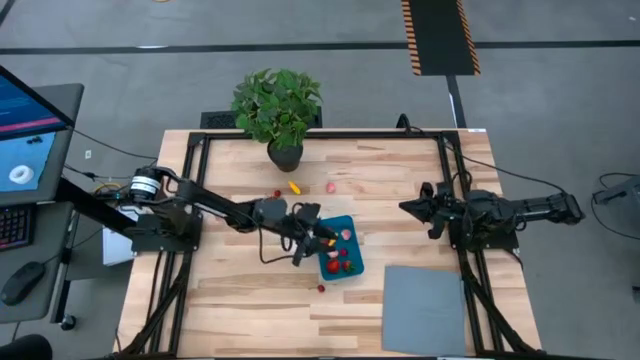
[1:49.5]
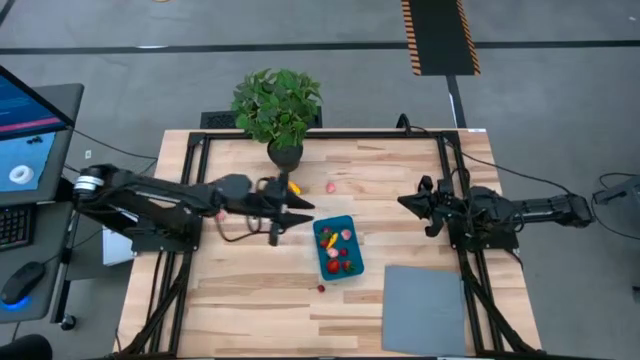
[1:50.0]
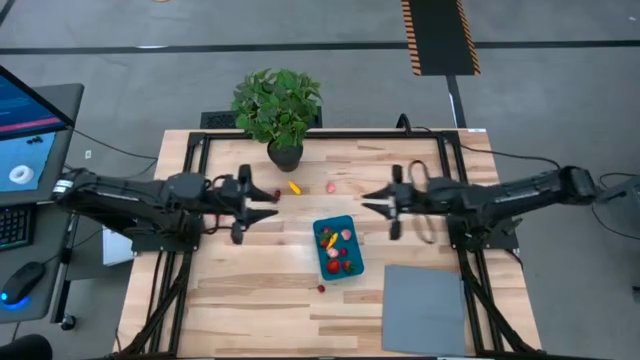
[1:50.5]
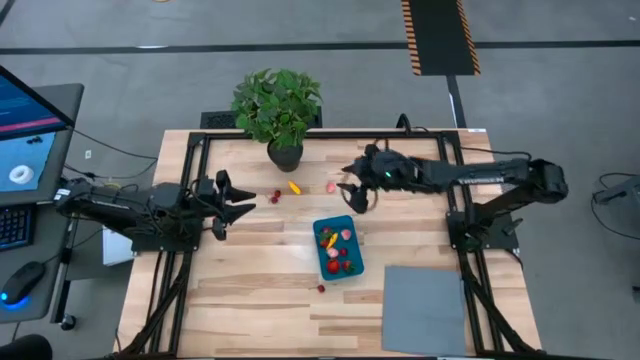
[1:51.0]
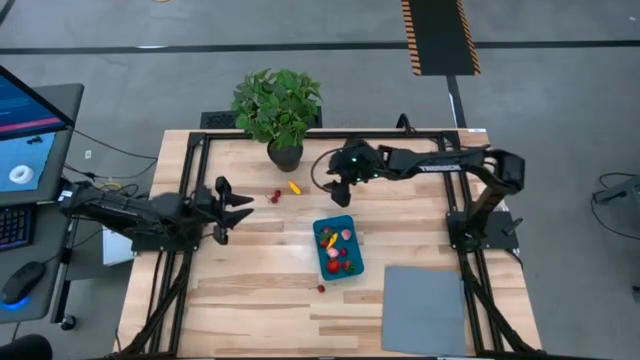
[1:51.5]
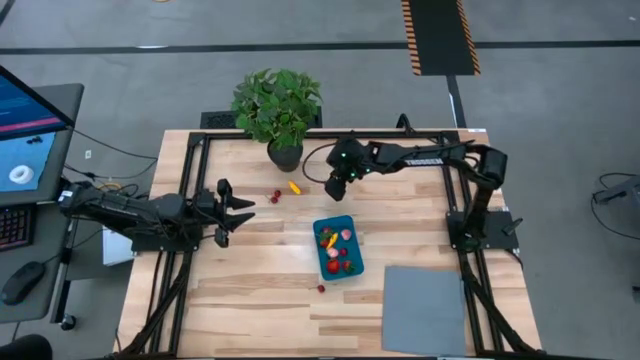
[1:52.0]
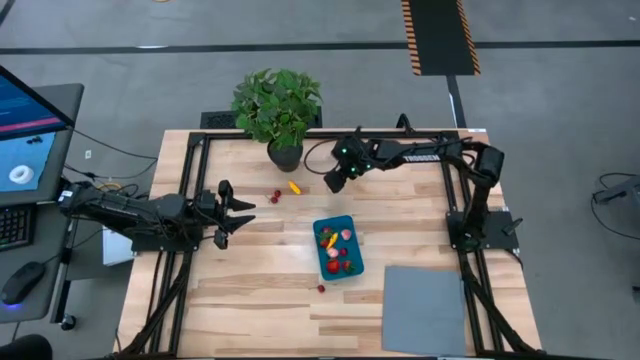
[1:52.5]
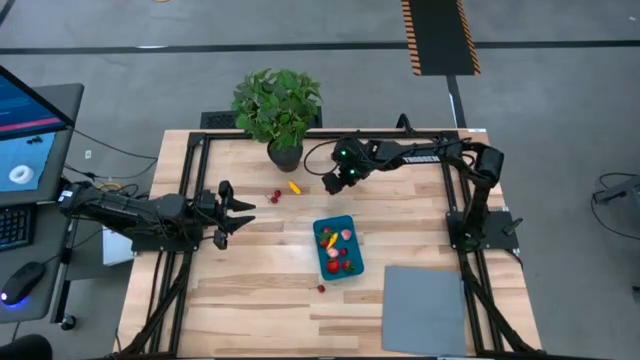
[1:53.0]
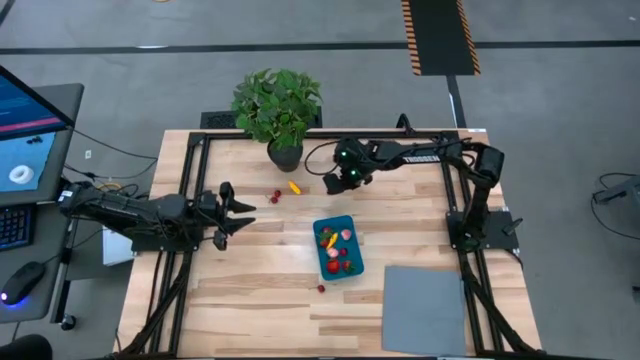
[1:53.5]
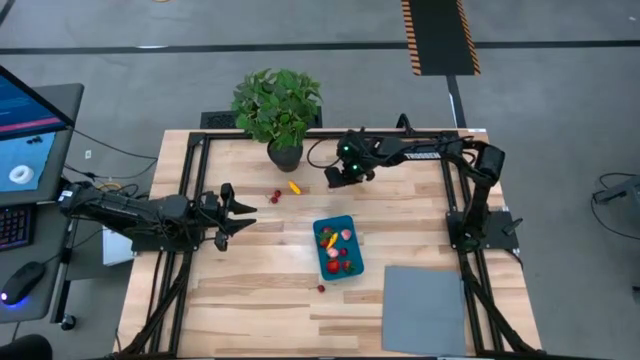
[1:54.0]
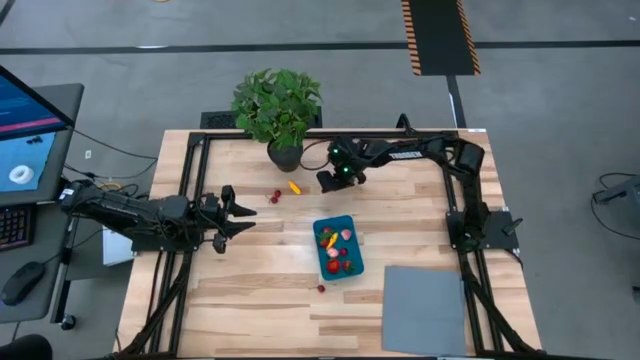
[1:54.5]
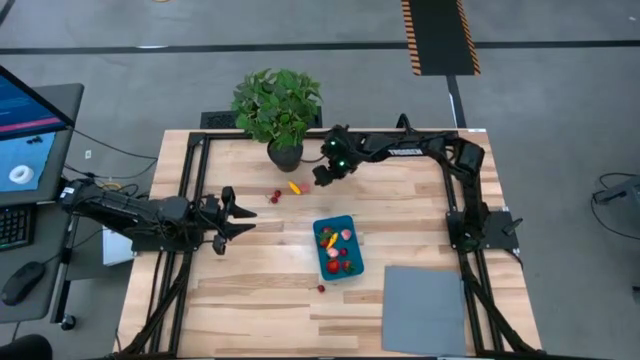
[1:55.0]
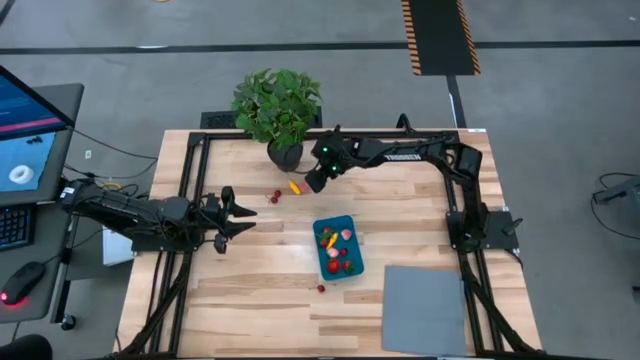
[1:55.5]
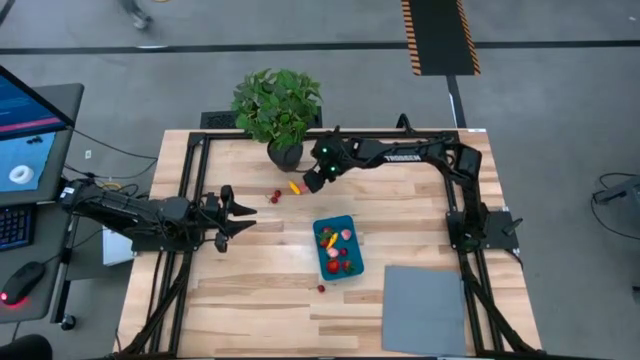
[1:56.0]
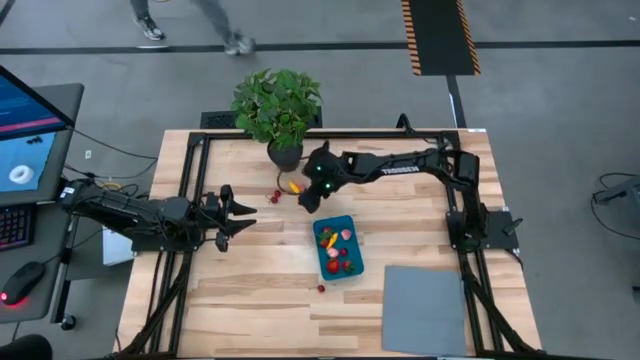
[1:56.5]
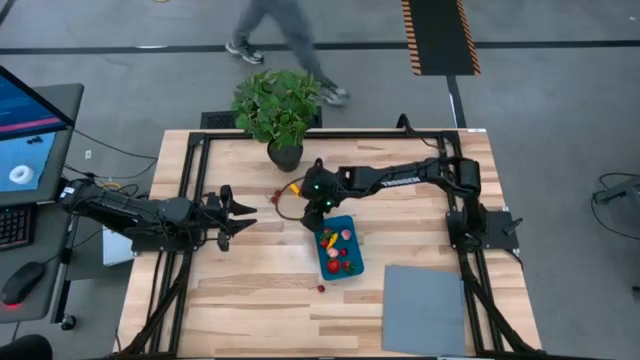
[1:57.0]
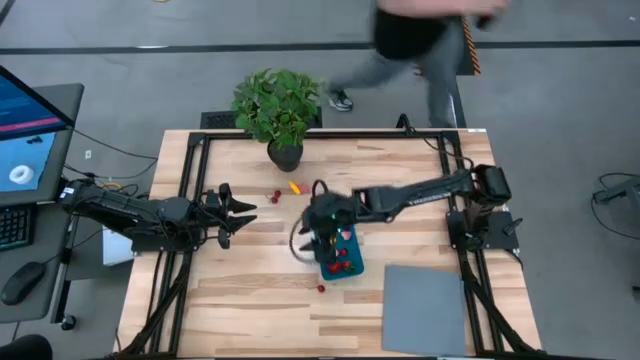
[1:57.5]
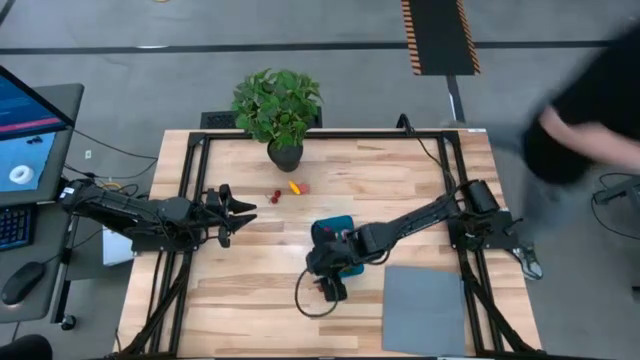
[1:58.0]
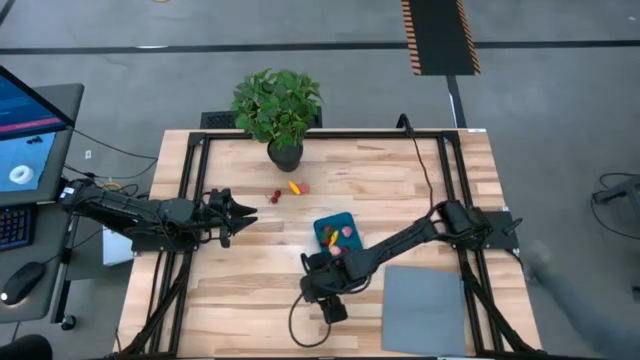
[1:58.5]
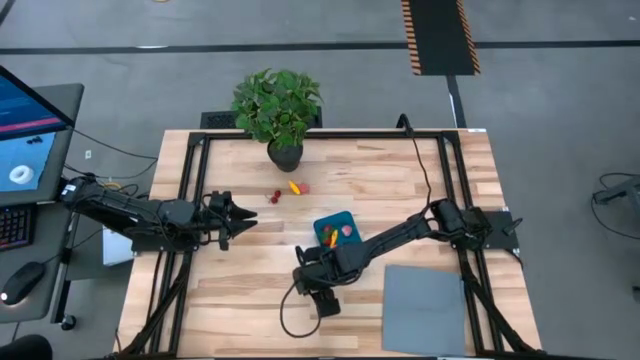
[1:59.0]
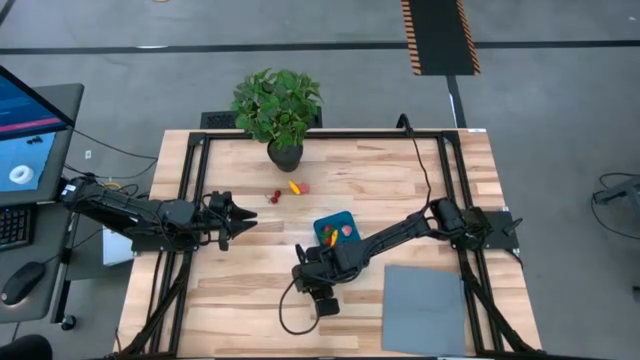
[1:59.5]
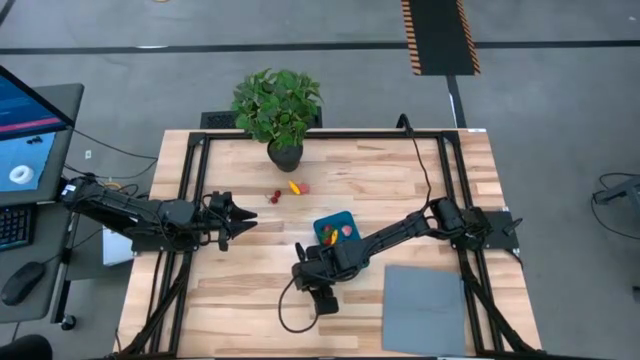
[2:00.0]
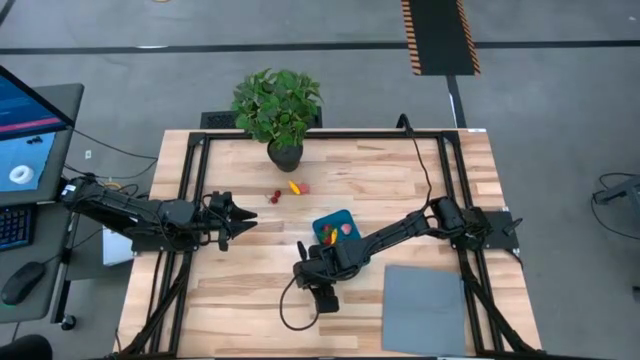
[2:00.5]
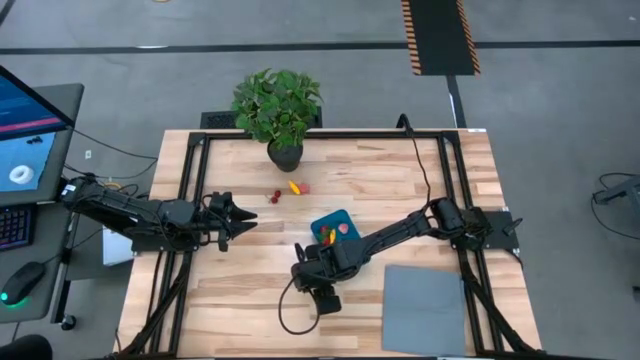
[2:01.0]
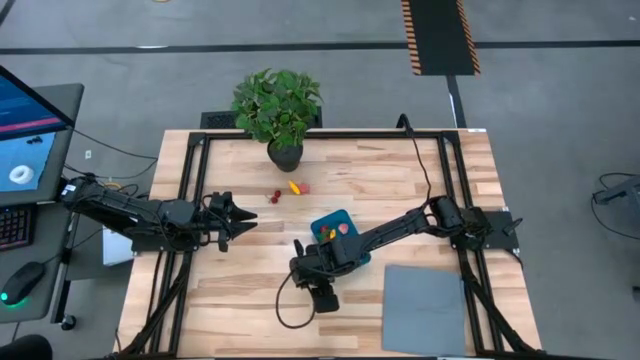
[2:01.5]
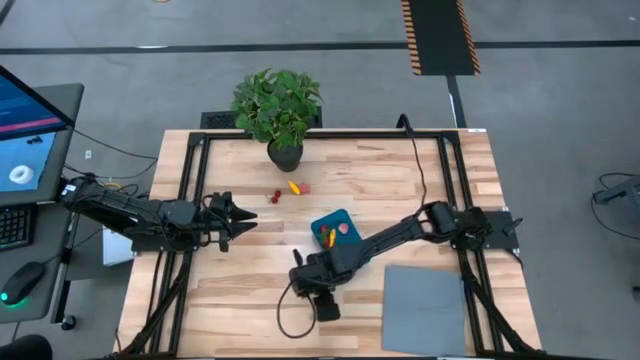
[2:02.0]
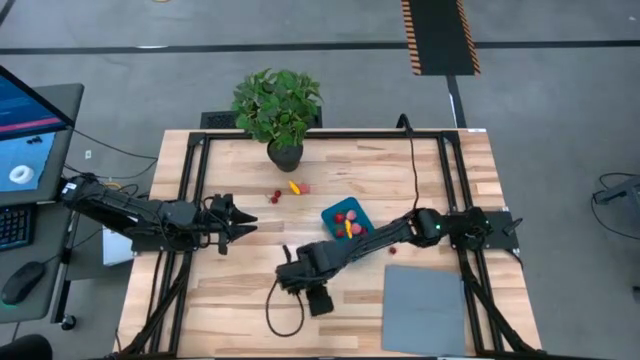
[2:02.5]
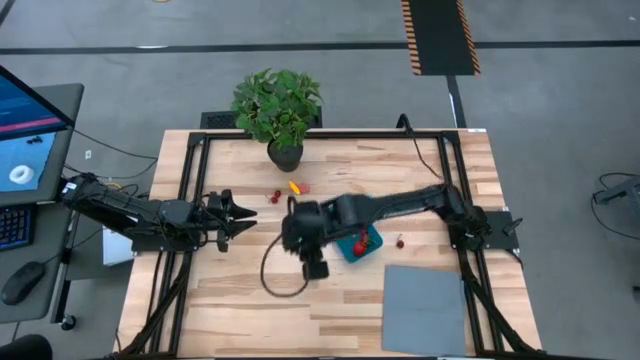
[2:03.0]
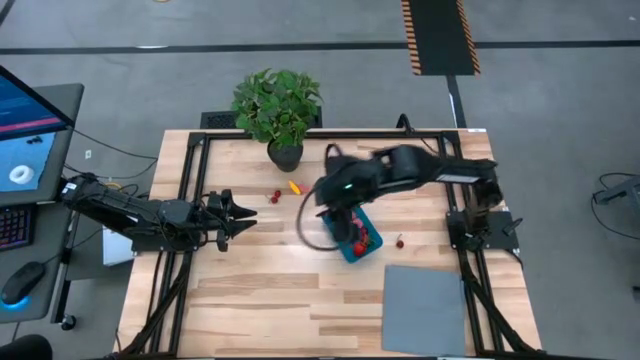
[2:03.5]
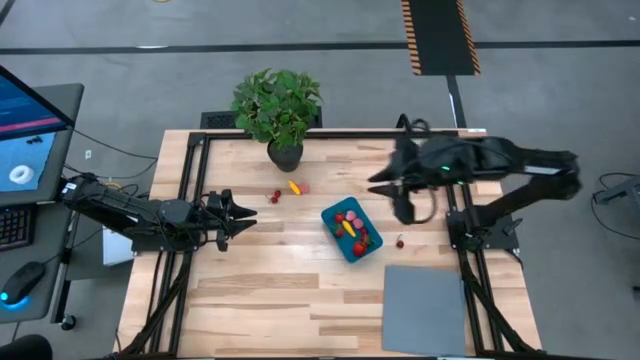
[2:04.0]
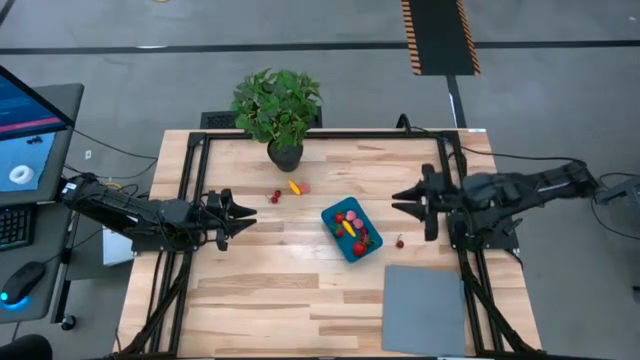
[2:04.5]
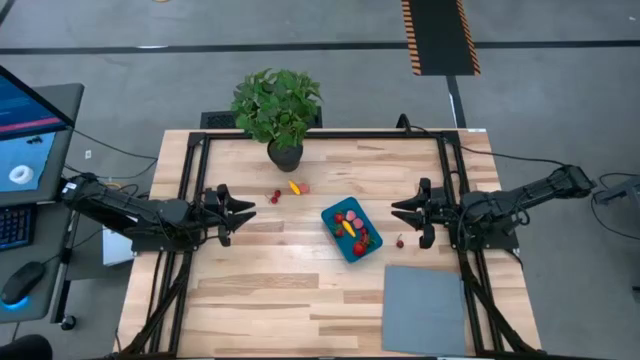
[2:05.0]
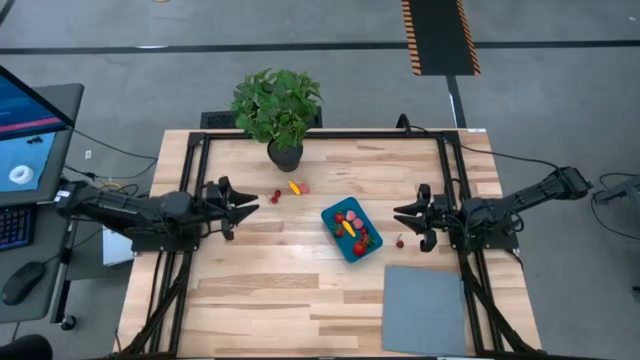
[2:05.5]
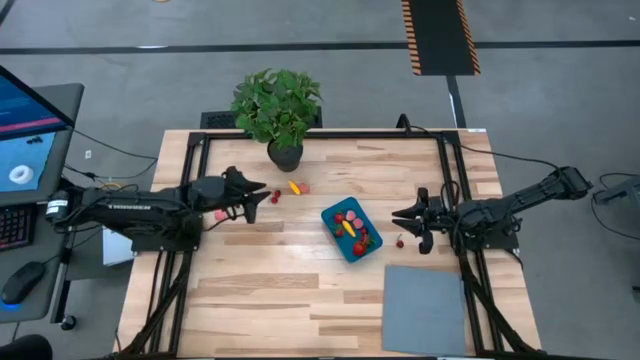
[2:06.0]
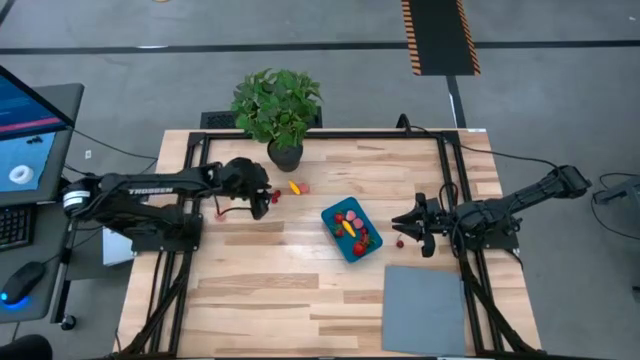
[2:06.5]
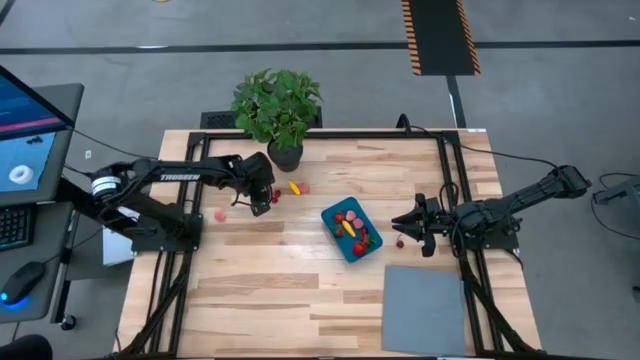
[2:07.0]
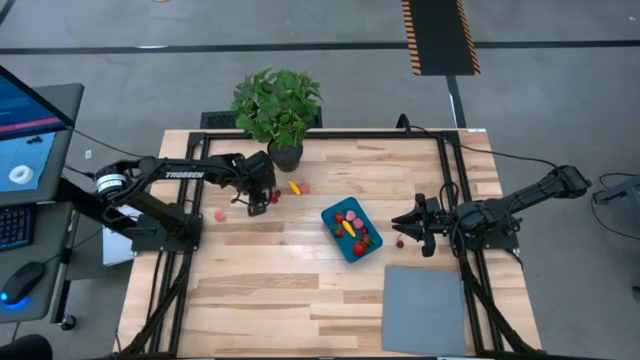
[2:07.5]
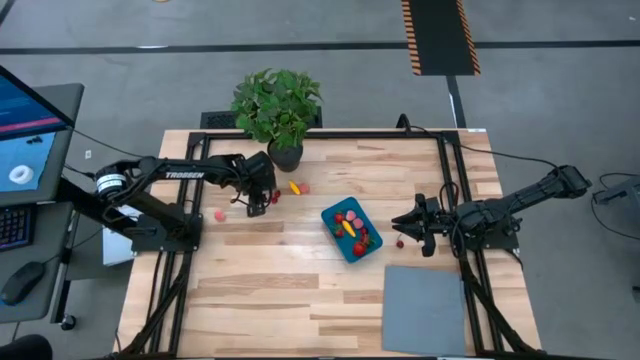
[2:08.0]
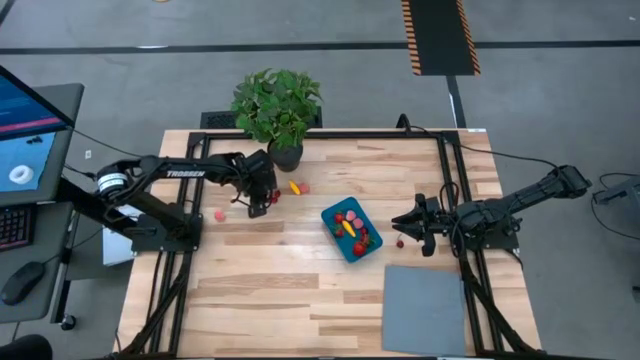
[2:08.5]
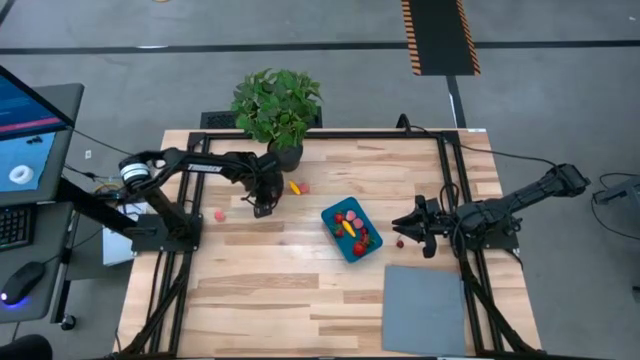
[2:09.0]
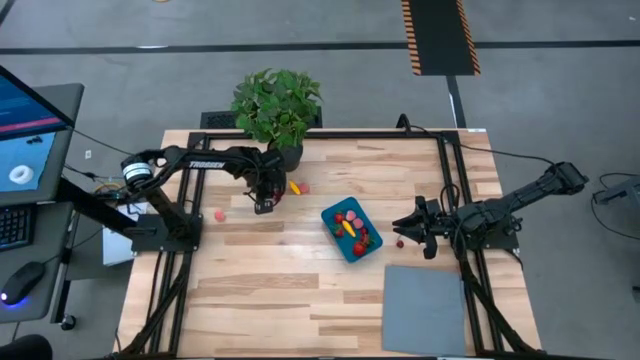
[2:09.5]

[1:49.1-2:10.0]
Task: Pick and placing Produce into tupperware
Put the bottom cherry into the blue bin
